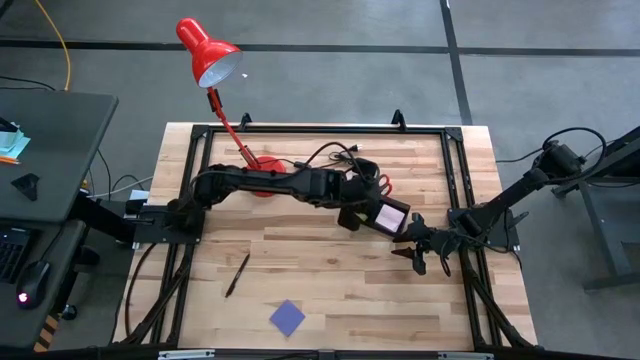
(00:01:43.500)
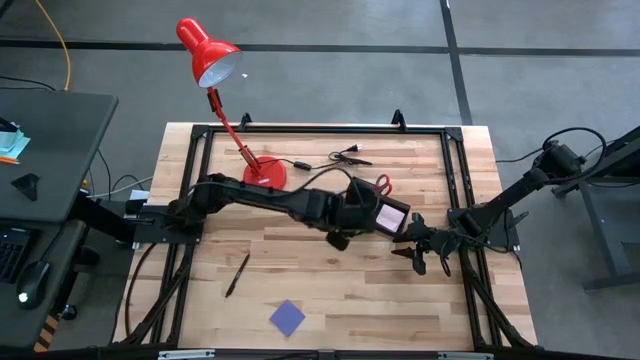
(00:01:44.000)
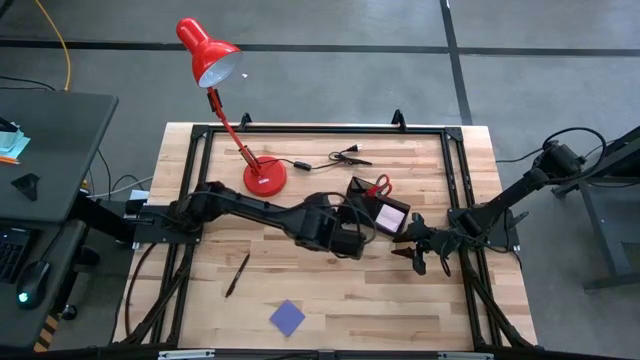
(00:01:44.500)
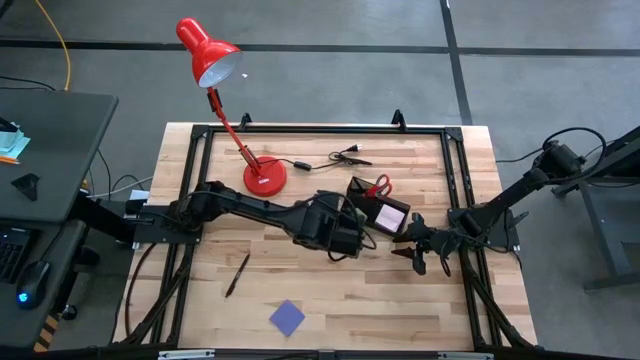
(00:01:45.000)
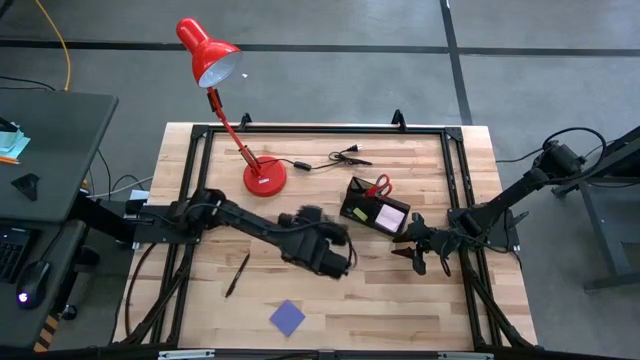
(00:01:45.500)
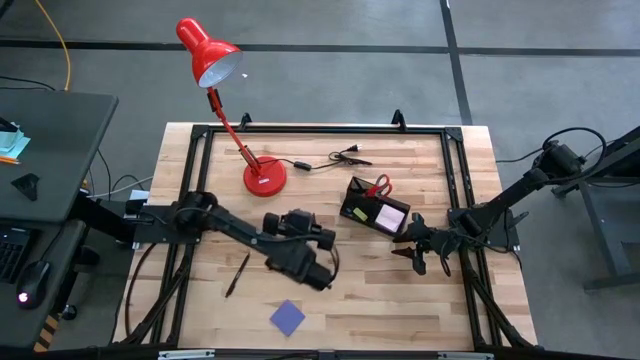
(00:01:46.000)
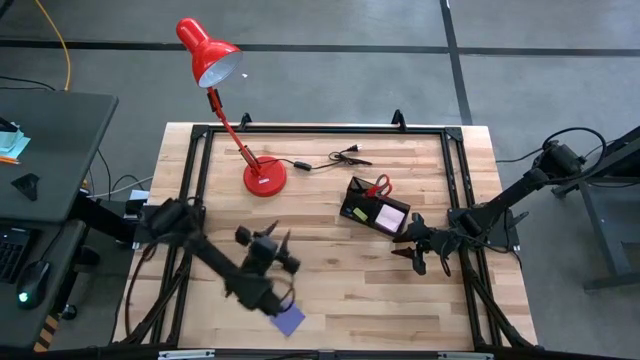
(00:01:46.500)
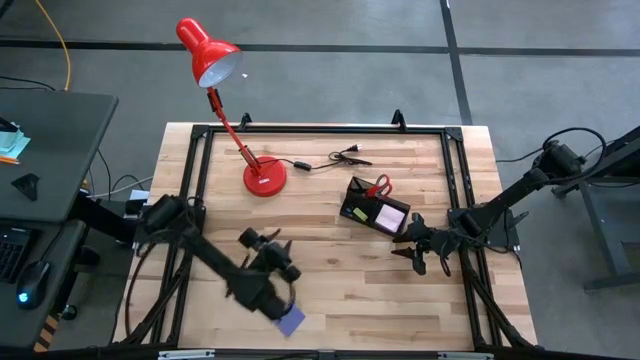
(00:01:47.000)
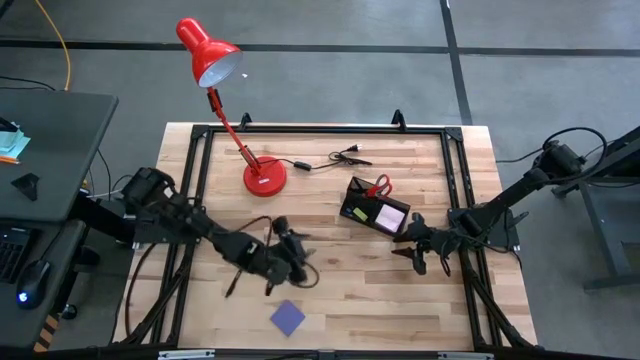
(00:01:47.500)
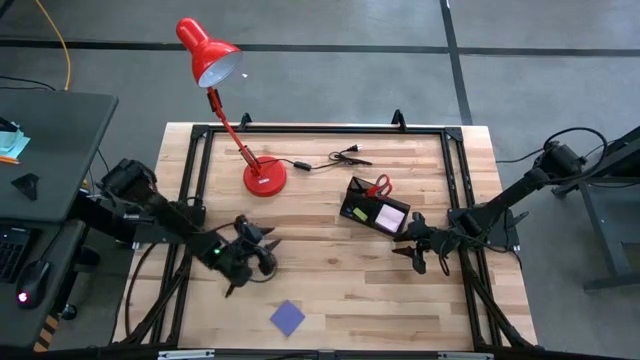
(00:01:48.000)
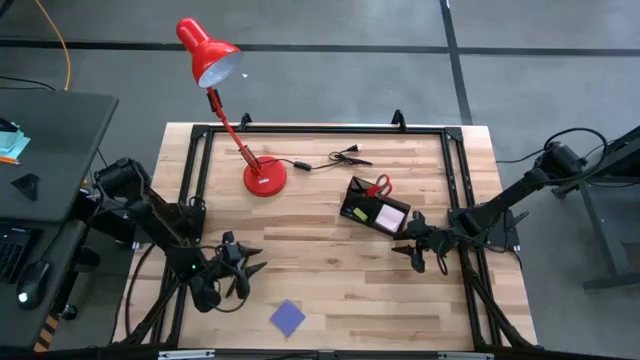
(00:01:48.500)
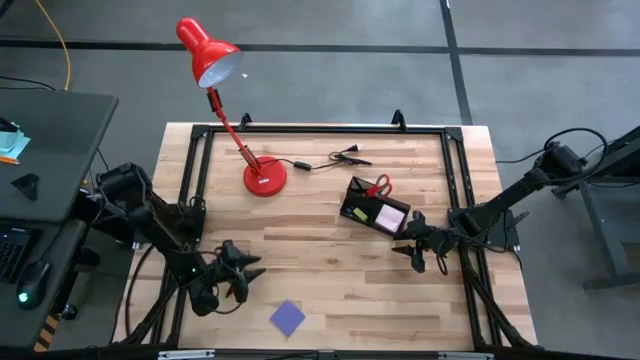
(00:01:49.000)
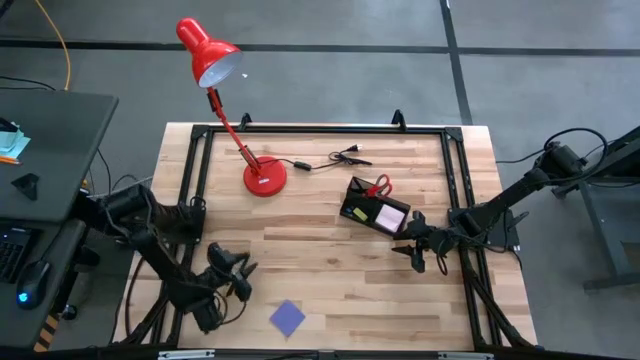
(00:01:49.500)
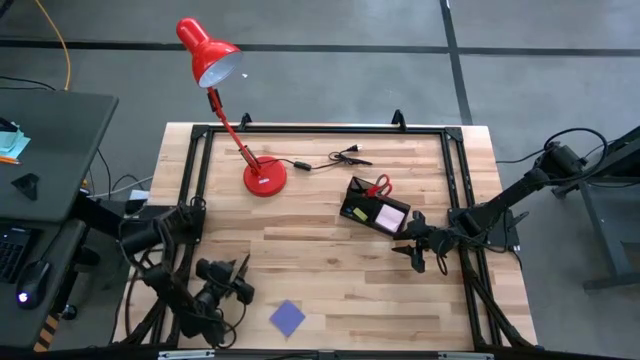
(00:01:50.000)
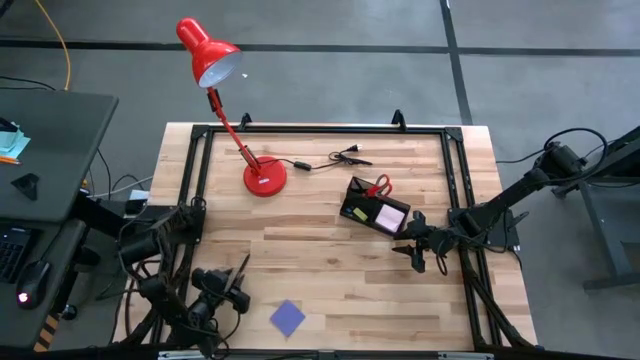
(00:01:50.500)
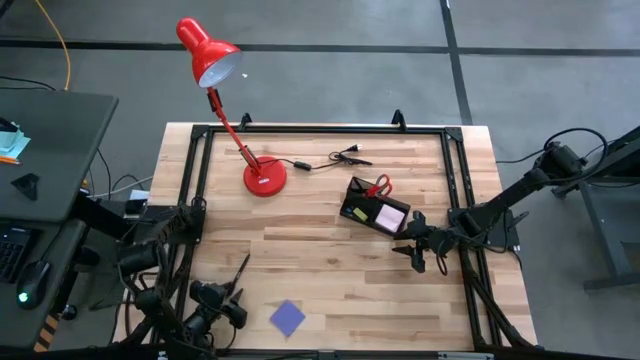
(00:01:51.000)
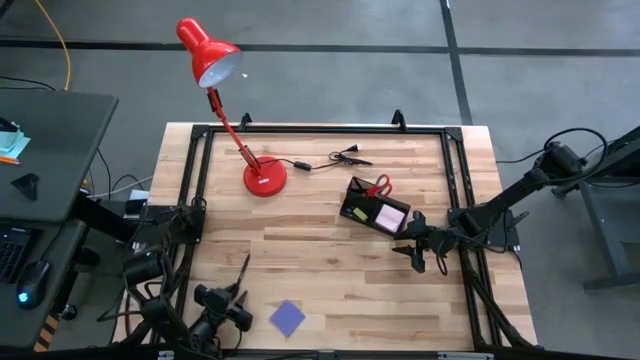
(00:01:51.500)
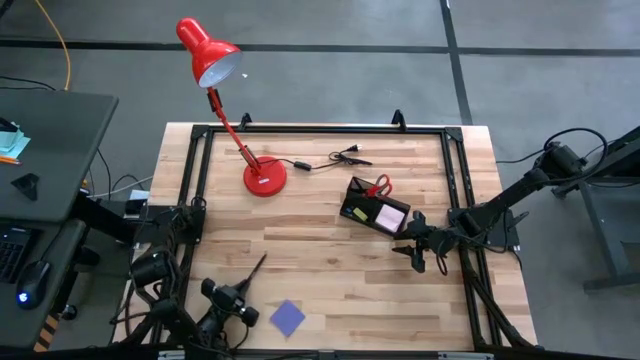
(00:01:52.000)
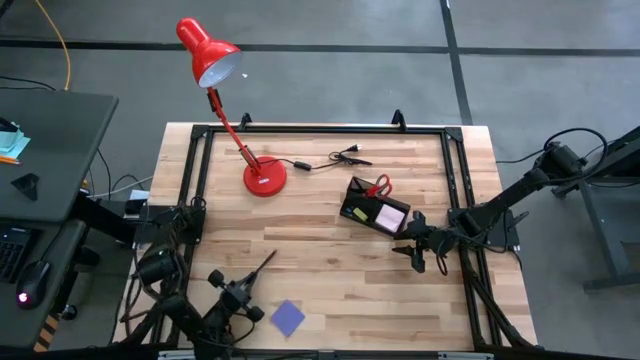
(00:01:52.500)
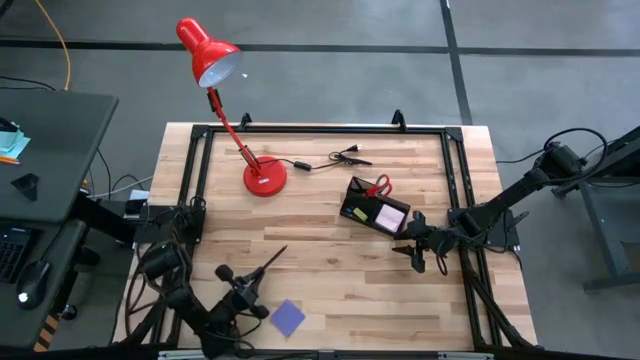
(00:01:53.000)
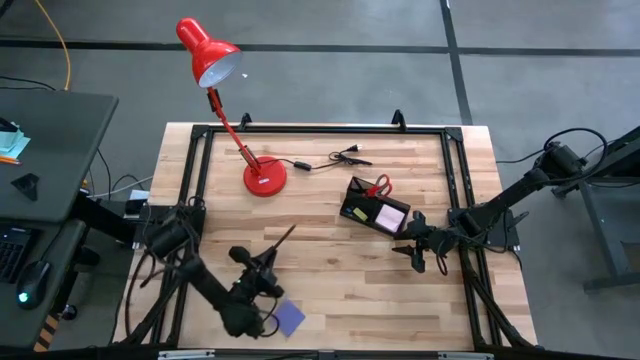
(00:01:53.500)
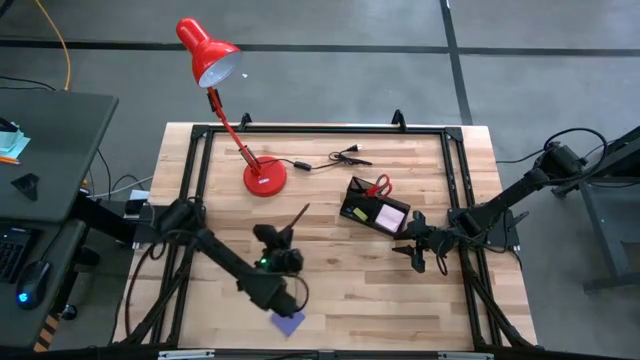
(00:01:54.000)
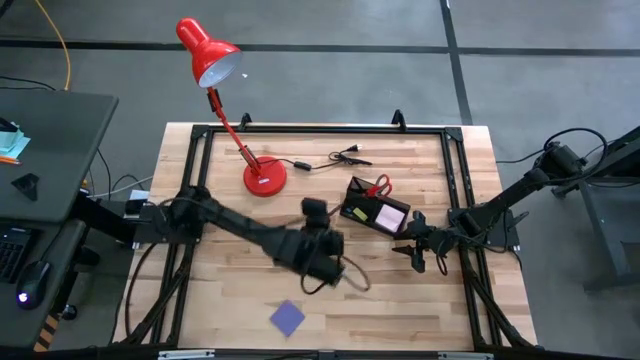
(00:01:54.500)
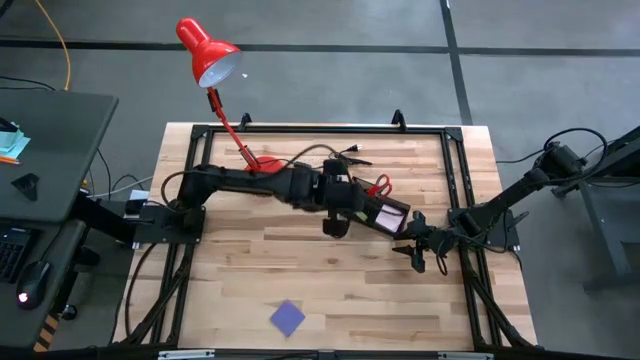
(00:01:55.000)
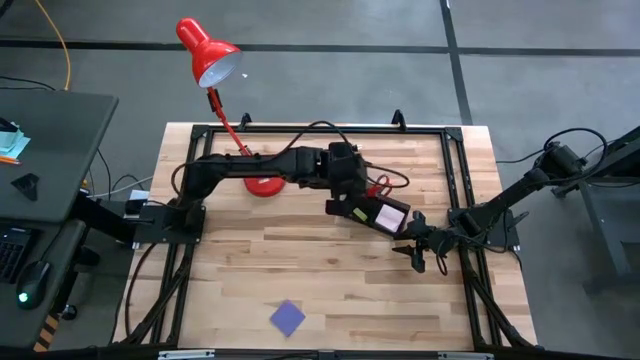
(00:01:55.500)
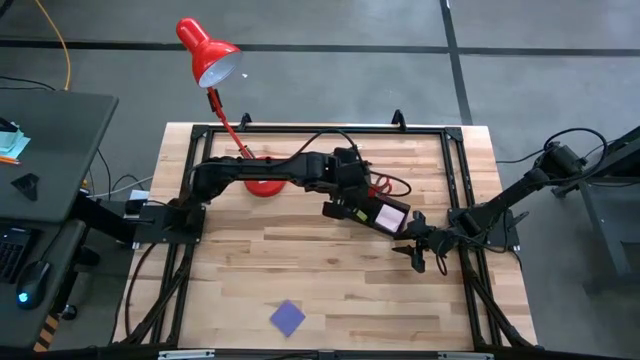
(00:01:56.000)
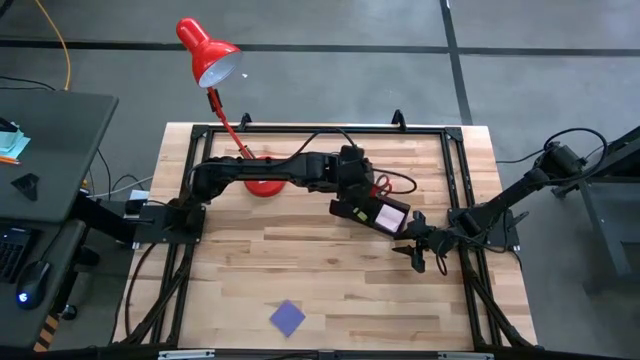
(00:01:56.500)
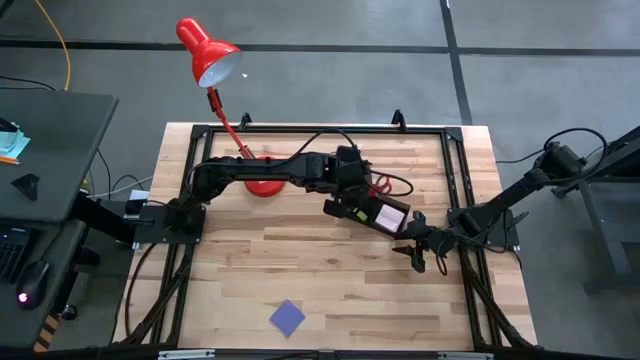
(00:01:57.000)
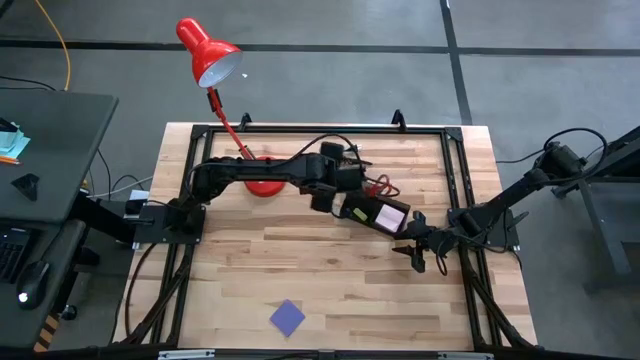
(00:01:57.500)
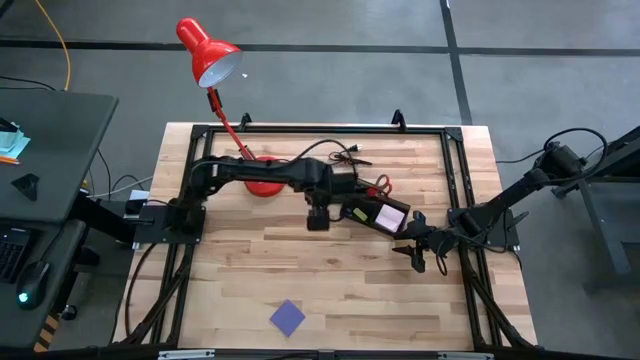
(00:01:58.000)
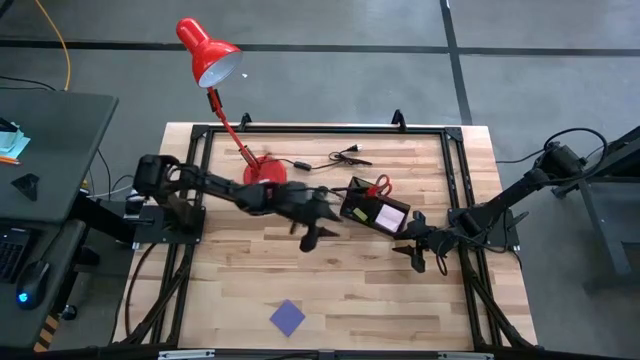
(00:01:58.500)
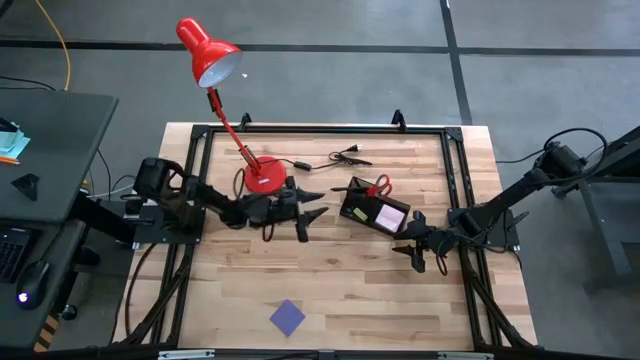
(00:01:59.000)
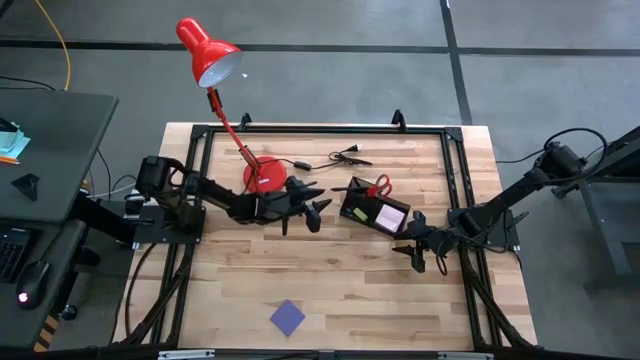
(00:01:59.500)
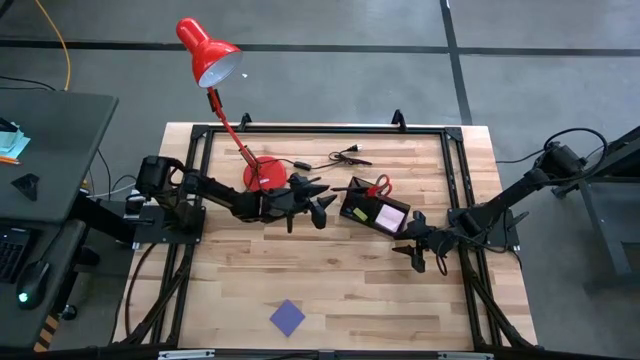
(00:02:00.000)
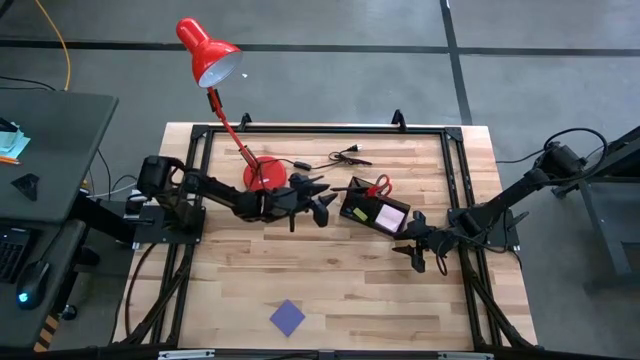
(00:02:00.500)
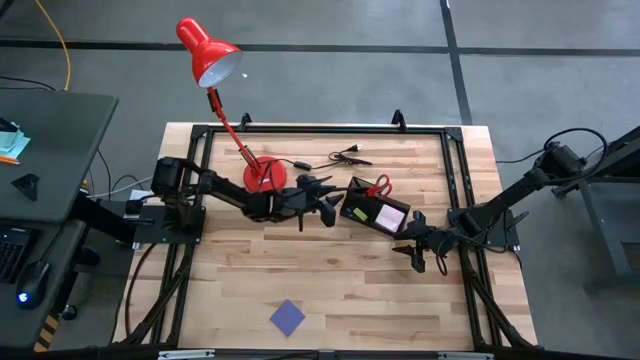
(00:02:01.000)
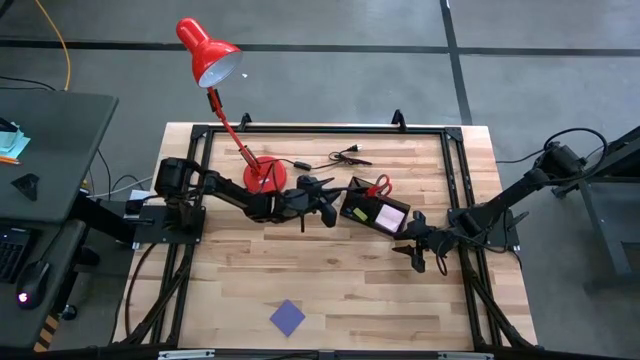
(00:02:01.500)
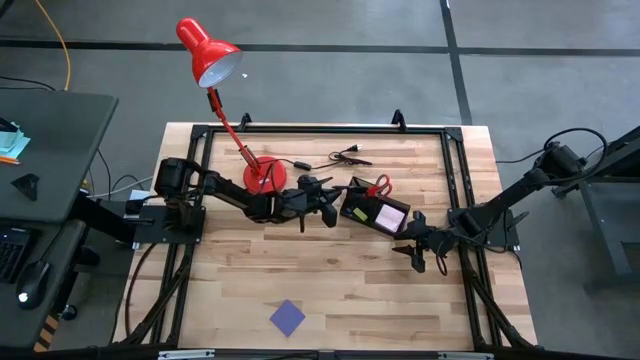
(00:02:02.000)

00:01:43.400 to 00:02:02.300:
Task: Pick and place office supplies into organizer
Put the black pen into the desk organizer

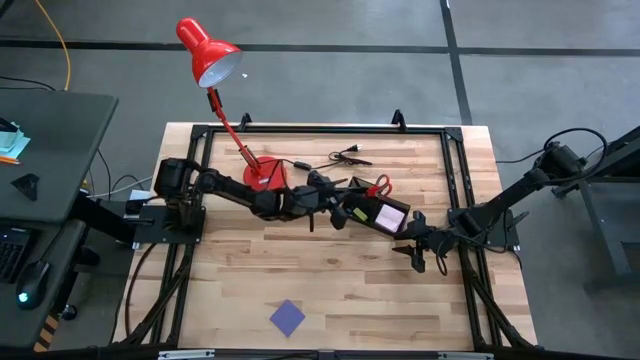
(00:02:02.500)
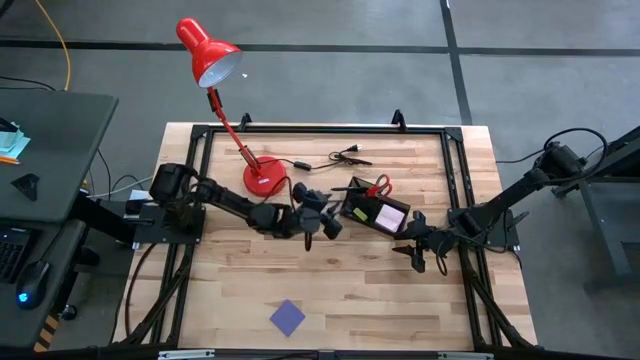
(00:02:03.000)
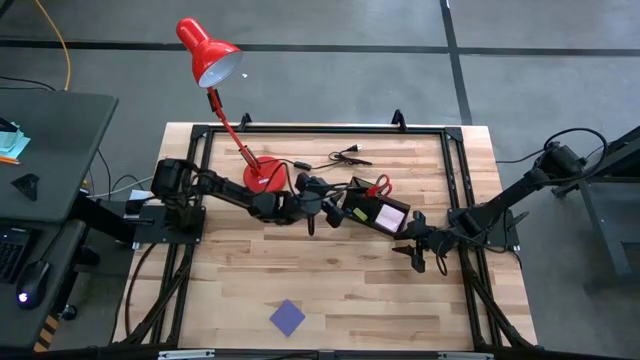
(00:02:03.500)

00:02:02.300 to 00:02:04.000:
Put the black pen into the desk organizer
